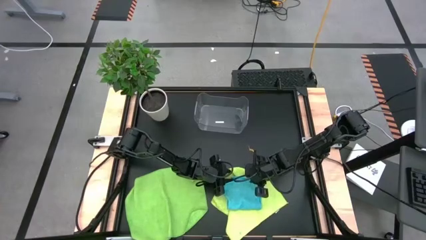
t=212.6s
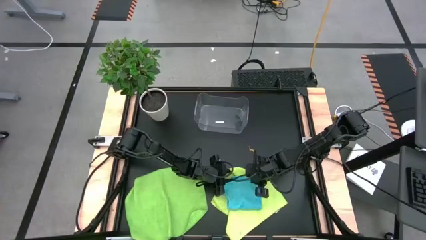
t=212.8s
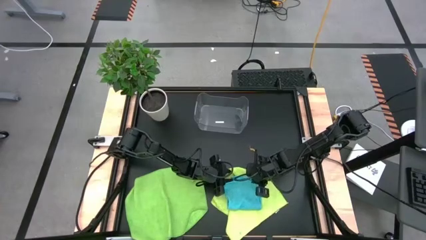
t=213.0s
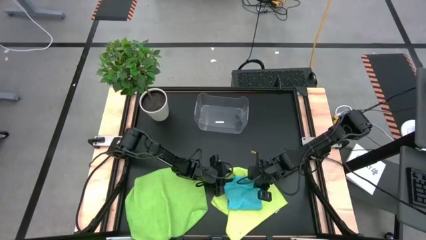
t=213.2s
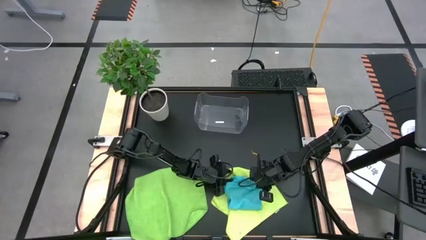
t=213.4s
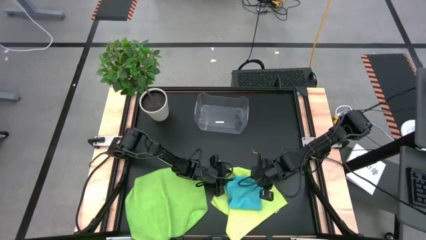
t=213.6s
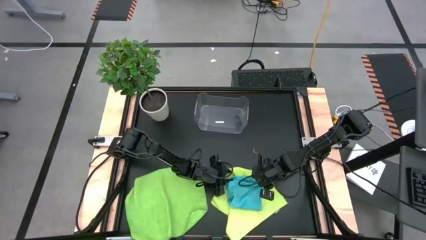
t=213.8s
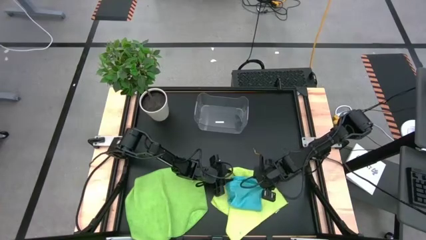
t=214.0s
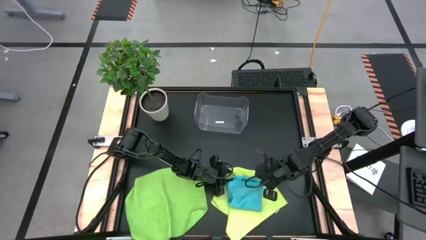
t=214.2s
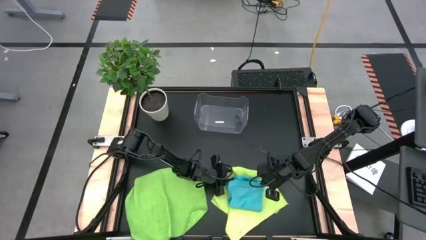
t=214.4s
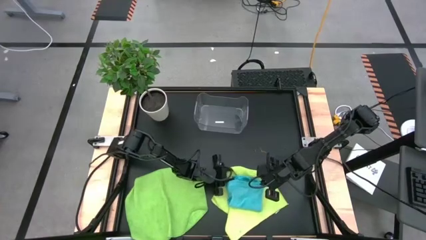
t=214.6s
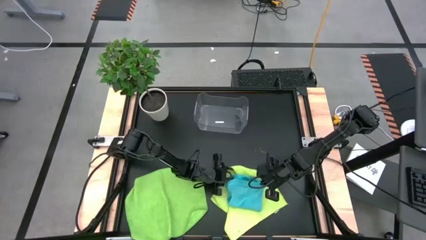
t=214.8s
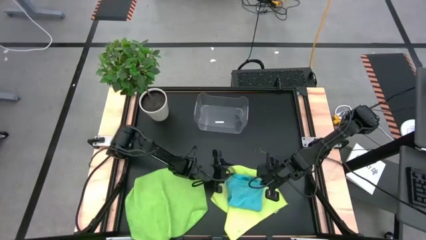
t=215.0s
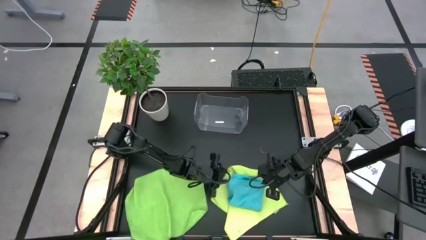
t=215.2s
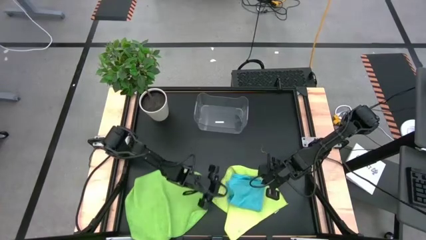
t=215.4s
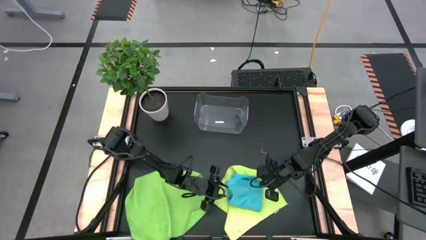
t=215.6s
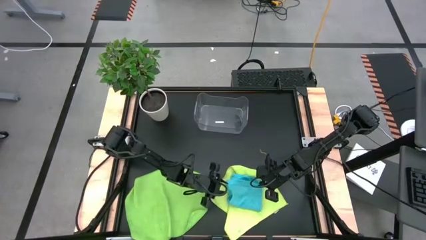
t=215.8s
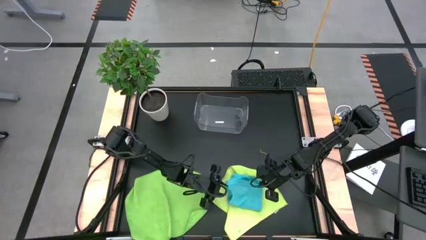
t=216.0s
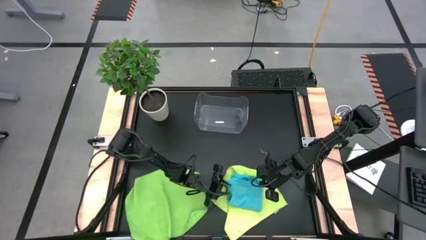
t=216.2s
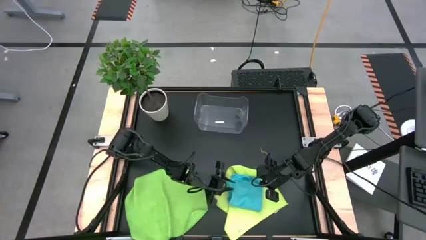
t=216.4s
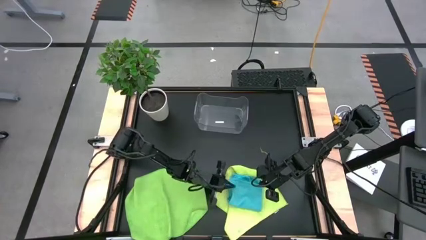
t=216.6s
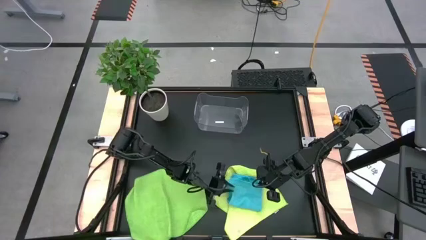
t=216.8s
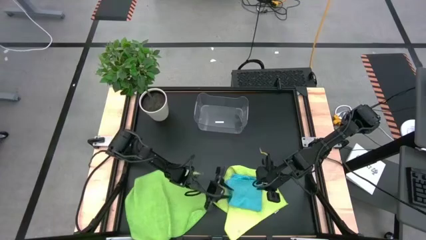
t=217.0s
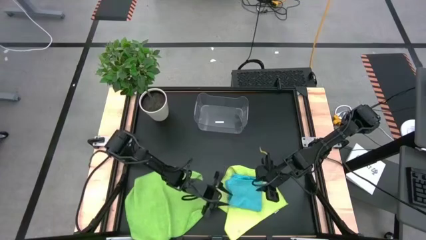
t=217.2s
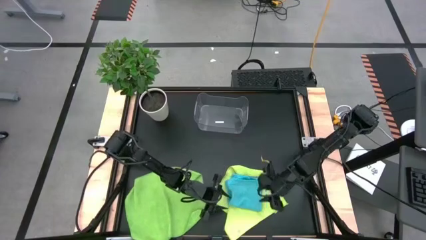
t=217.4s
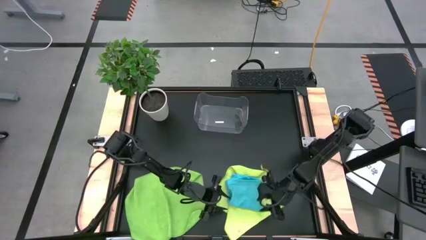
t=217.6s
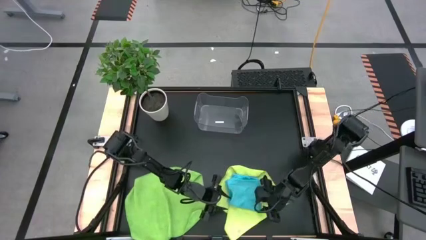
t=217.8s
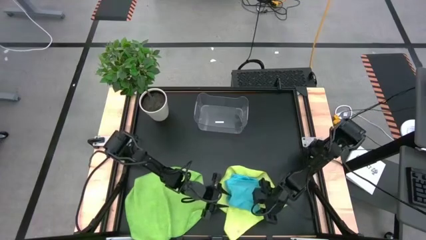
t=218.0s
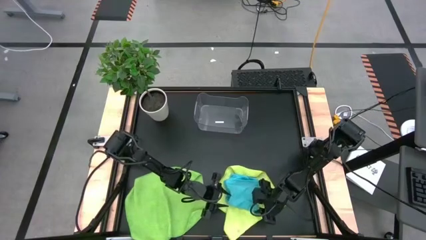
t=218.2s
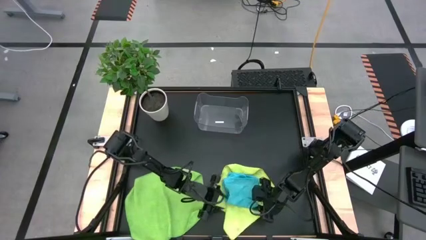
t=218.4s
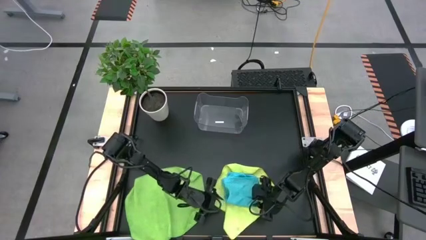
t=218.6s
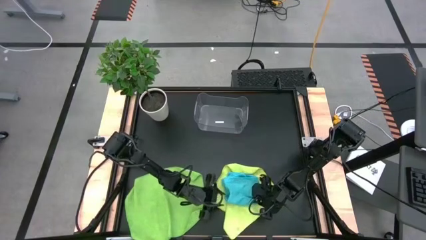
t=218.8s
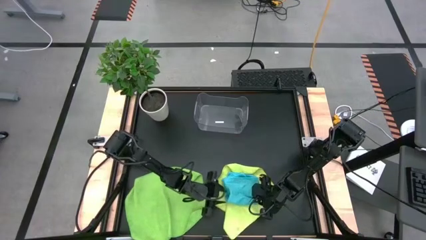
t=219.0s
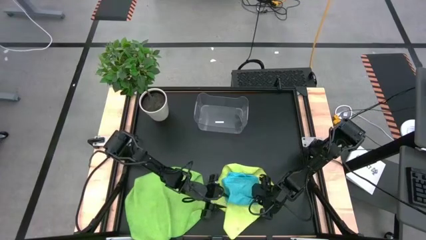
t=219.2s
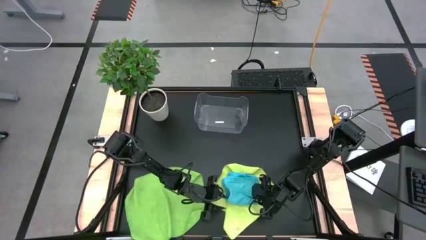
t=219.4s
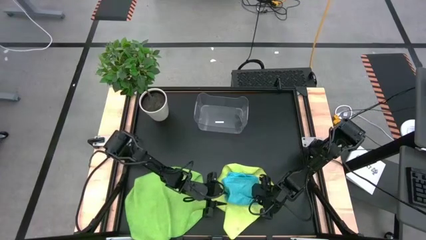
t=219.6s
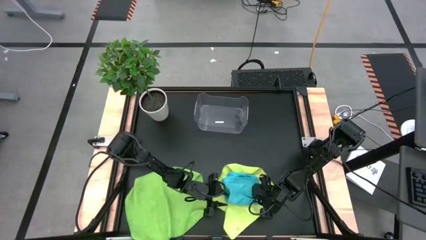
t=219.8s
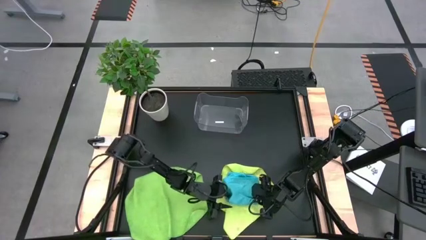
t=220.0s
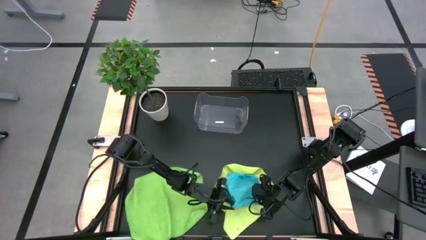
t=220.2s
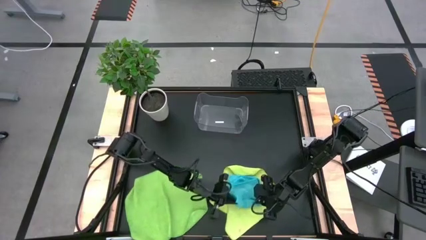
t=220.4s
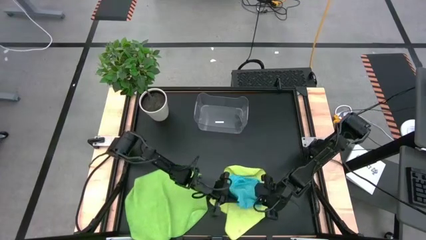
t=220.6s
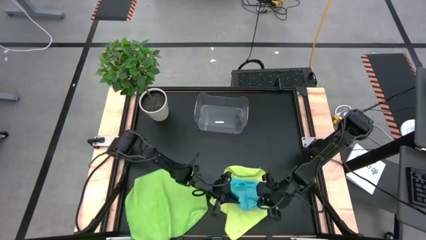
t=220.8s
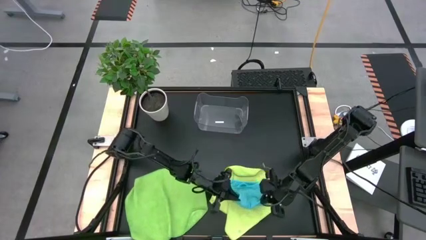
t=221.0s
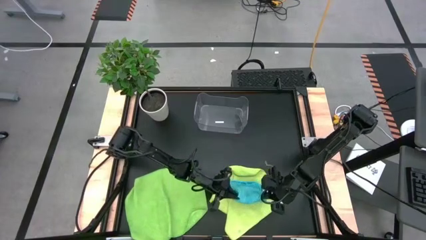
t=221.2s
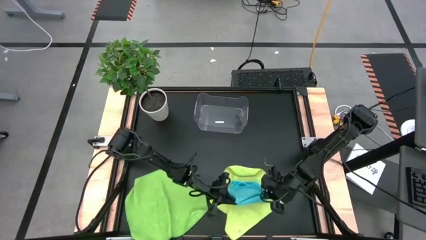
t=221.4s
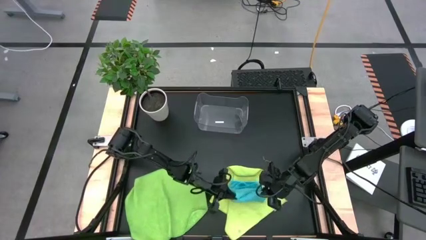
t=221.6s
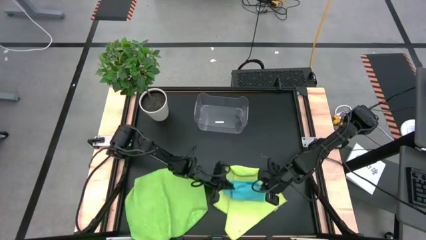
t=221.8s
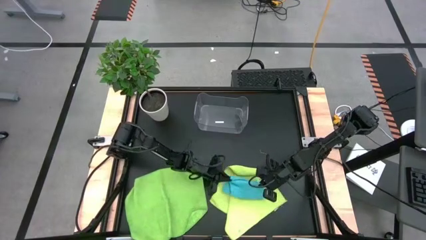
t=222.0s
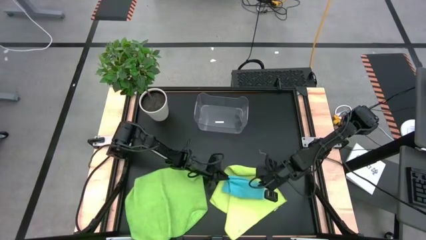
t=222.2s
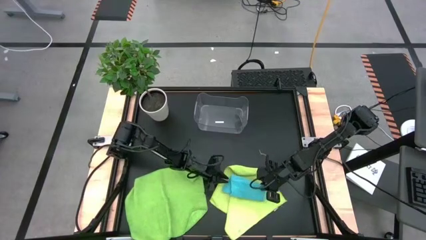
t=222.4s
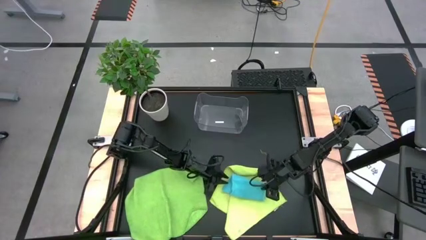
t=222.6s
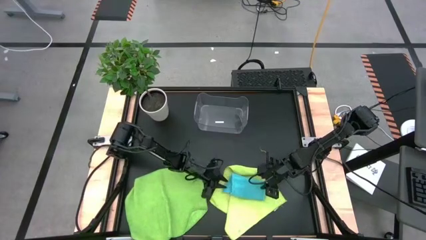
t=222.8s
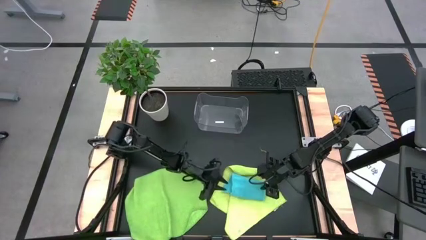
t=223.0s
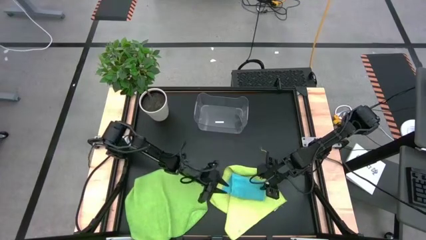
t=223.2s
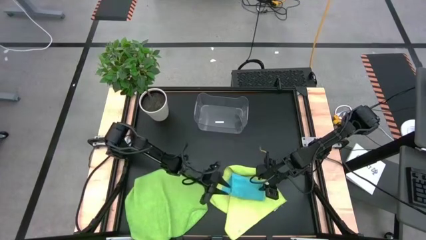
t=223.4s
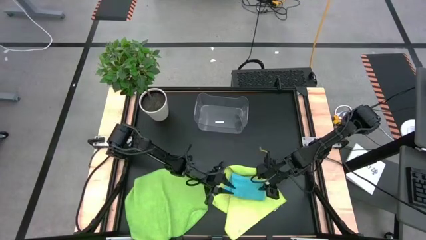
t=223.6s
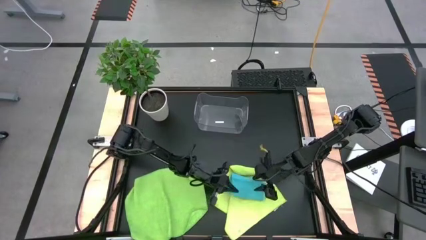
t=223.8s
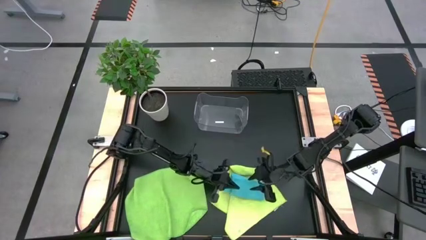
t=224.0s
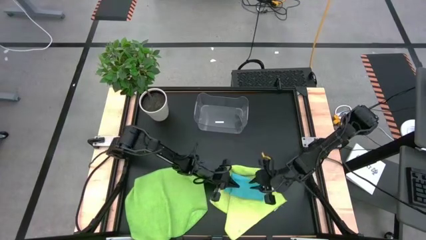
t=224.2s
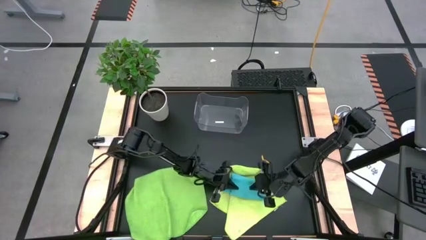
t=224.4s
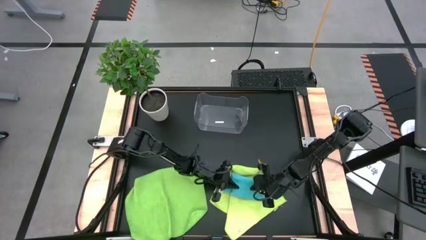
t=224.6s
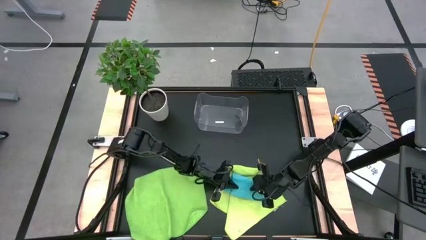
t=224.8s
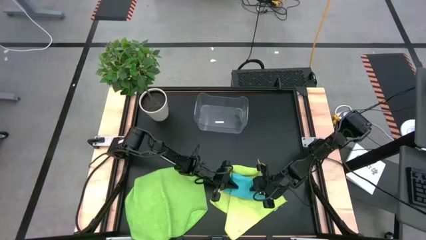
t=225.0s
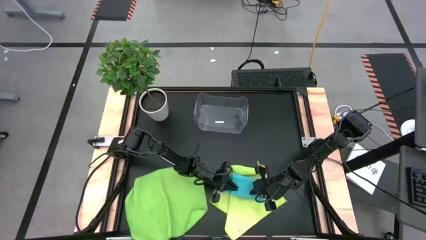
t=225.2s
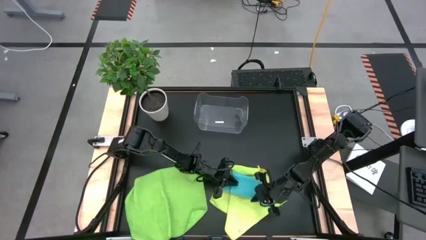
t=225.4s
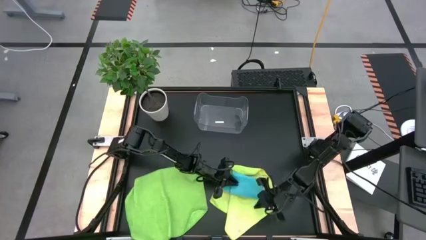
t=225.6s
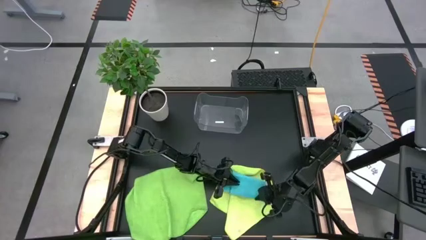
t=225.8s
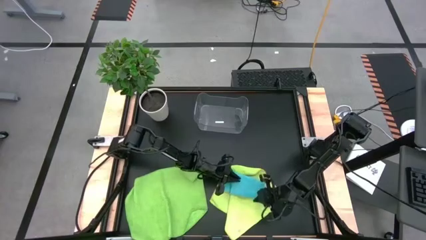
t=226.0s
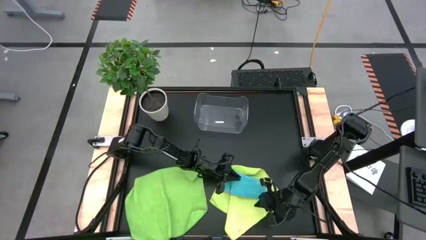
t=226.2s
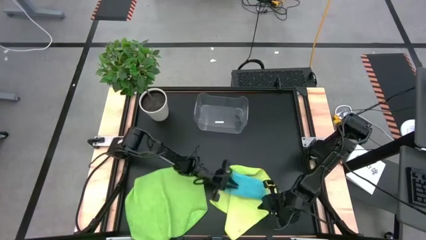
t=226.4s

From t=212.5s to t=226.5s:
Task: Fold microfiber towels
Fold the blue towel

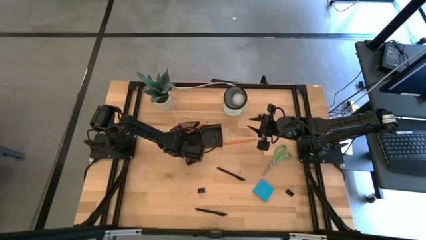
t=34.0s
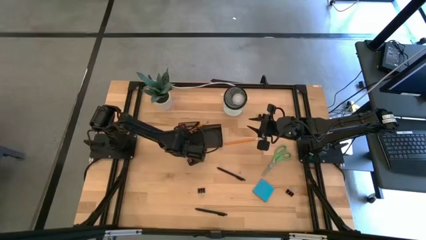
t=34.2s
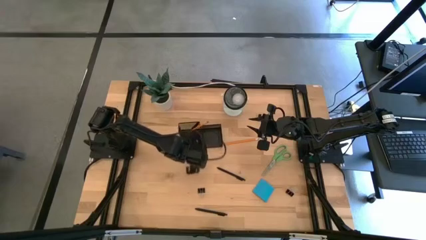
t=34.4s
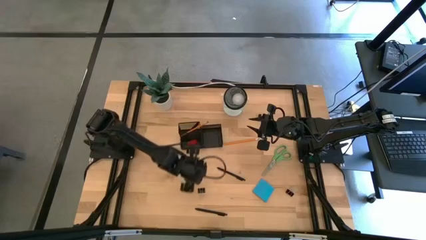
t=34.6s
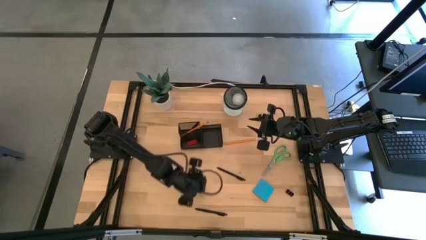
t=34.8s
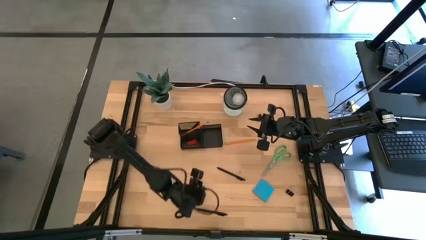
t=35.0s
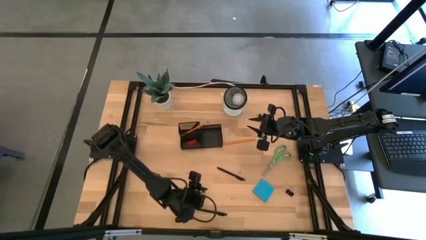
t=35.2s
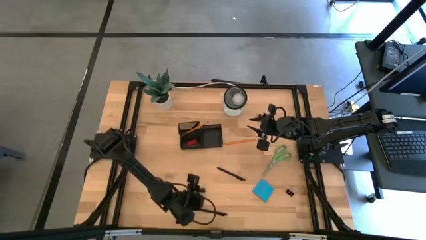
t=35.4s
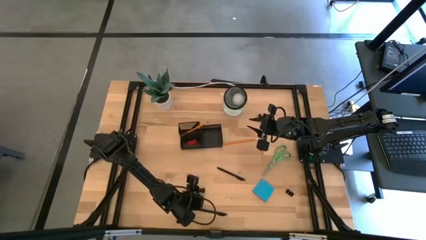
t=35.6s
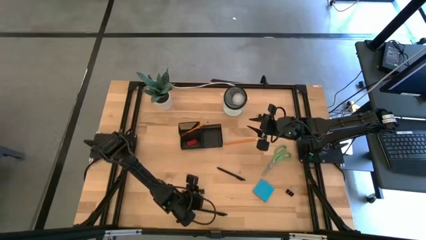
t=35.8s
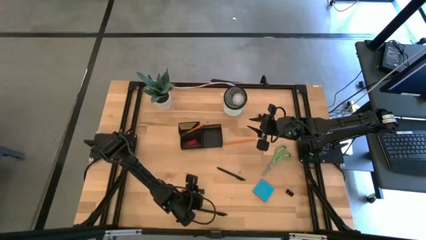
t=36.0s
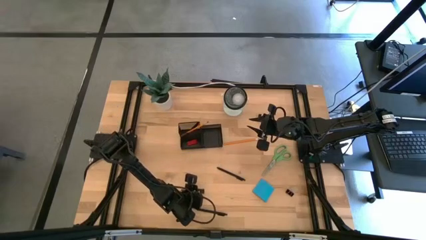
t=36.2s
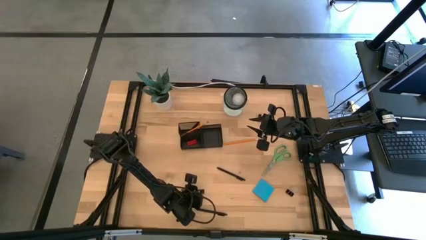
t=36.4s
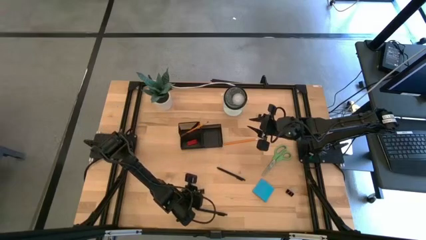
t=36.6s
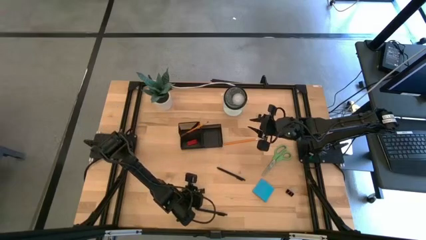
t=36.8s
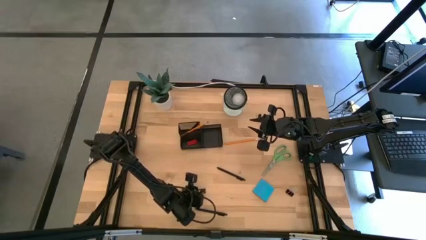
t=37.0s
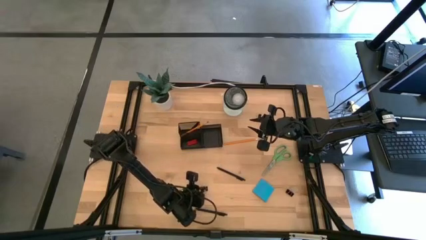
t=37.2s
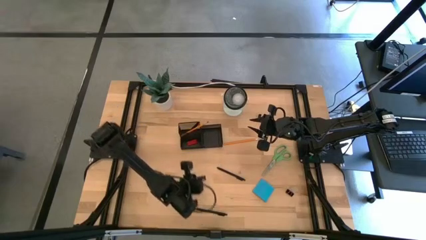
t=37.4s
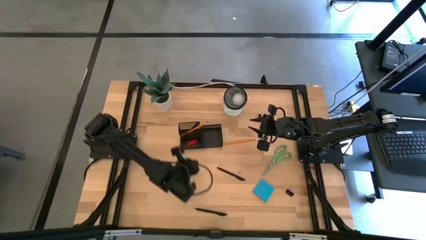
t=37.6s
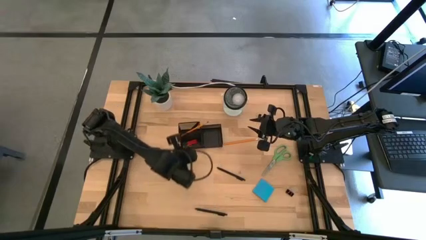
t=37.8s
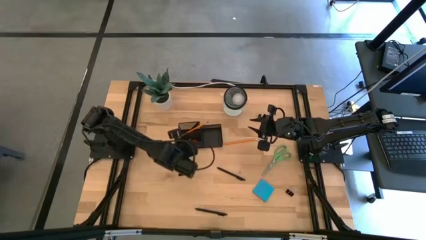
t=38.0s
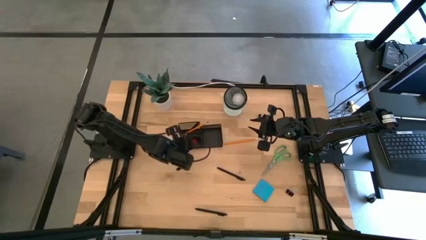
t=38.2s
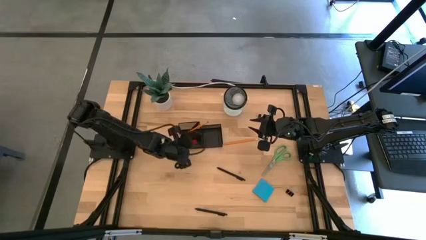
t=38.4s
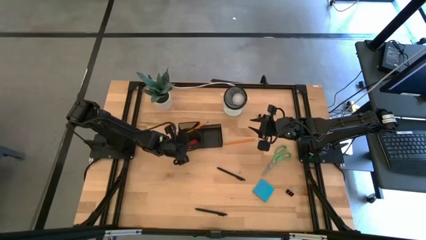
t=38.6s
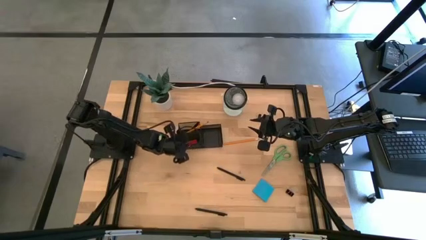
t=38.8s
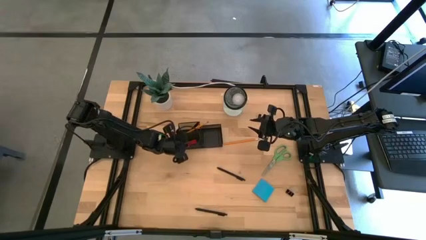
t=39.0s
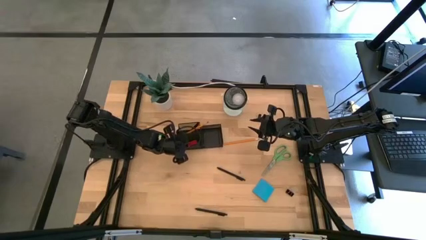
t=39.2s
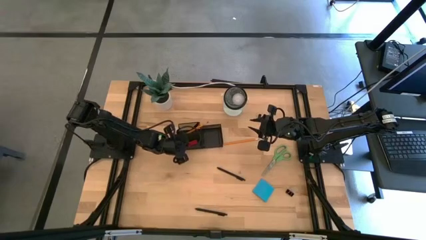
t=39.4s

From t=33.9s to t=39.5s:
Task: Pick and place office supplies into organizer
Put the bottom left black binder clip in the desk organizer
